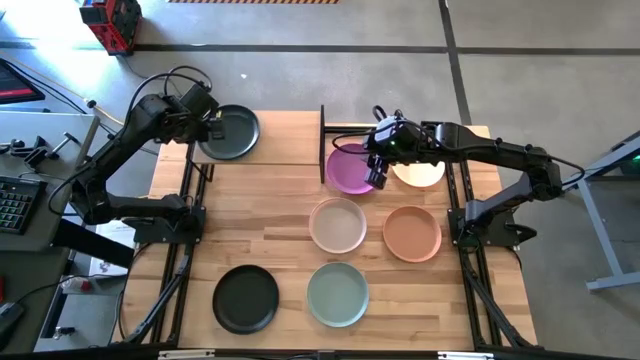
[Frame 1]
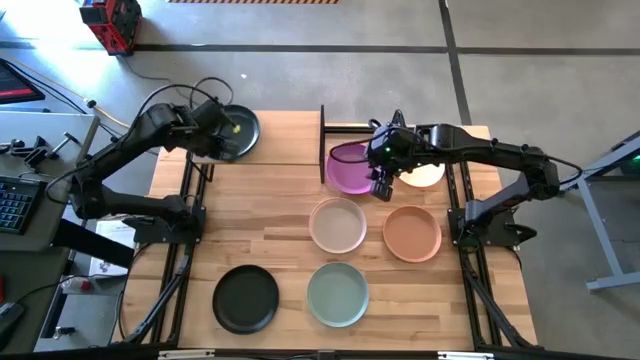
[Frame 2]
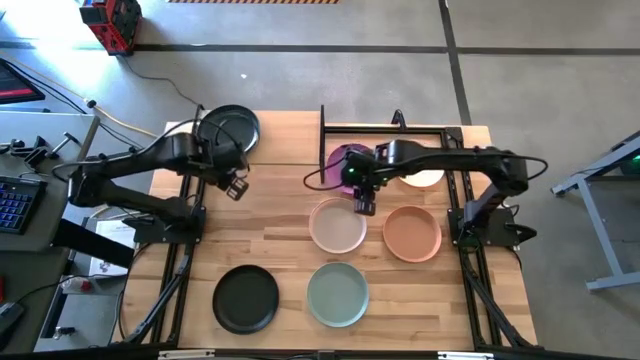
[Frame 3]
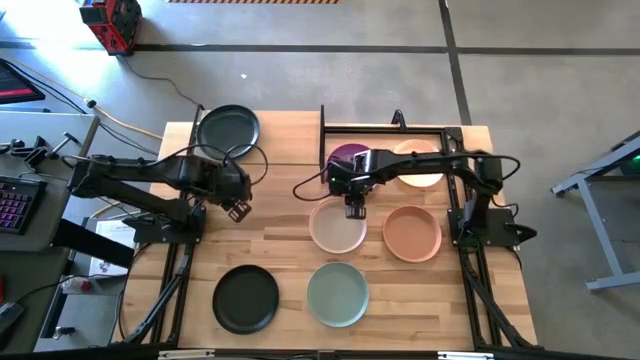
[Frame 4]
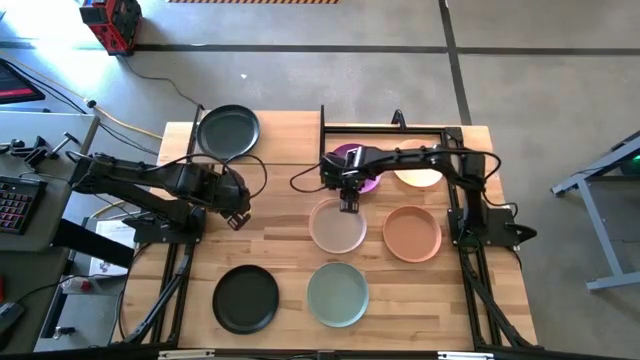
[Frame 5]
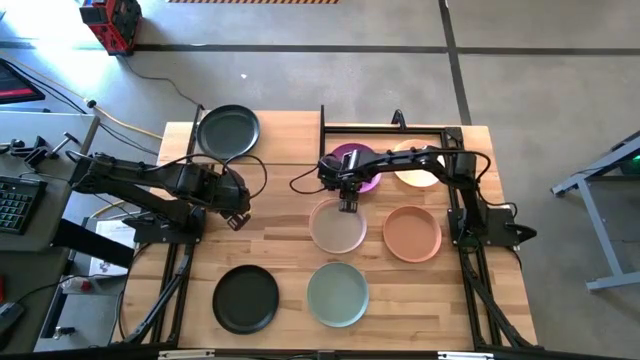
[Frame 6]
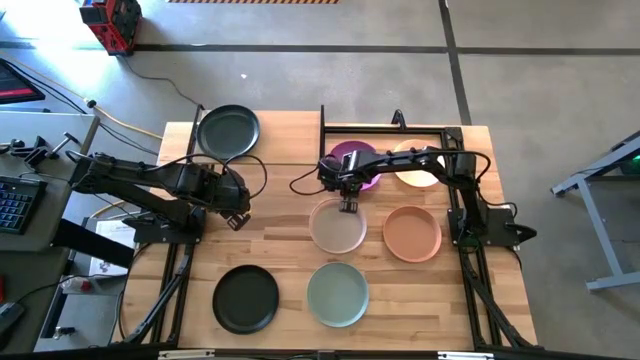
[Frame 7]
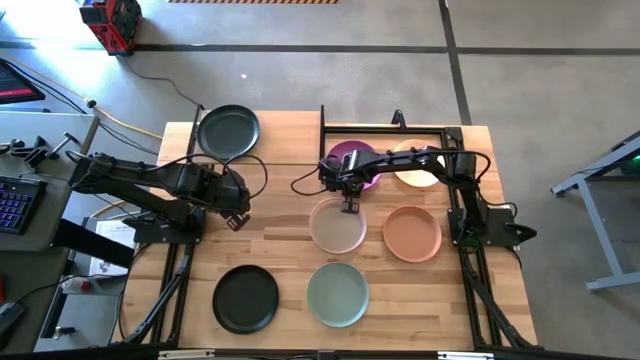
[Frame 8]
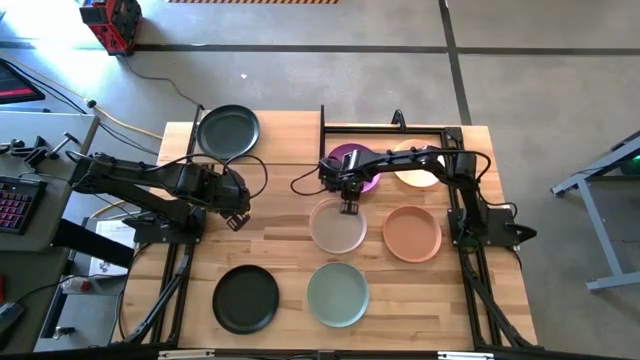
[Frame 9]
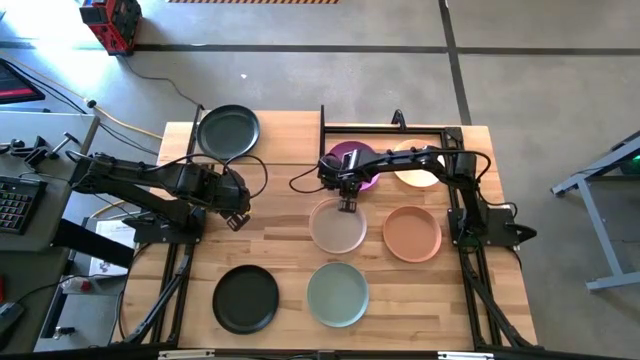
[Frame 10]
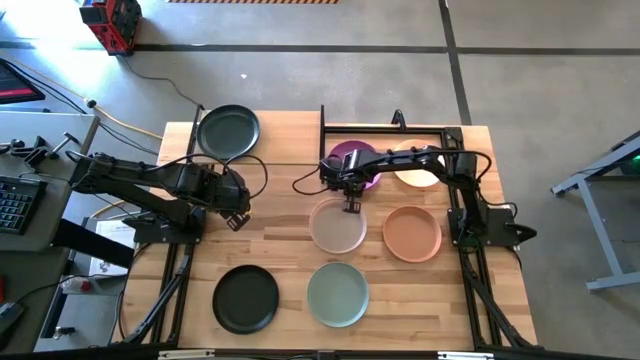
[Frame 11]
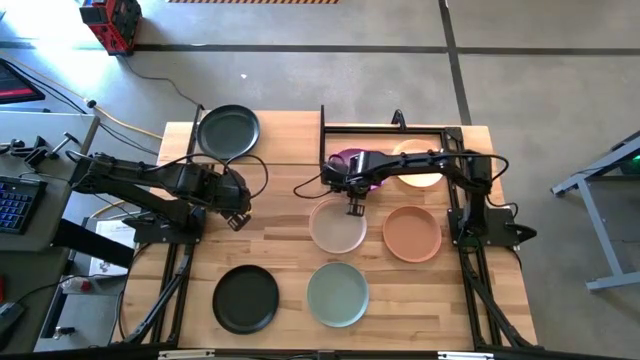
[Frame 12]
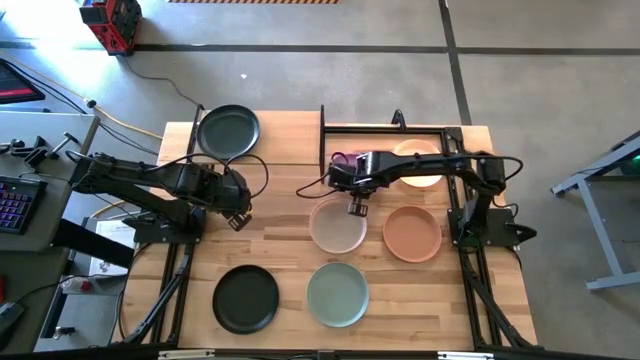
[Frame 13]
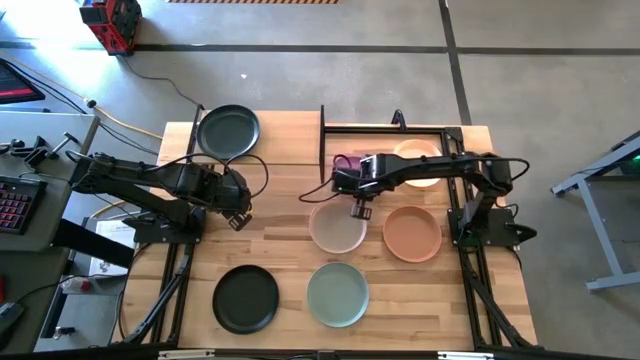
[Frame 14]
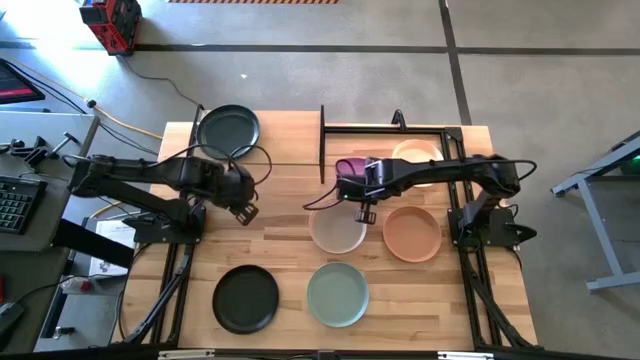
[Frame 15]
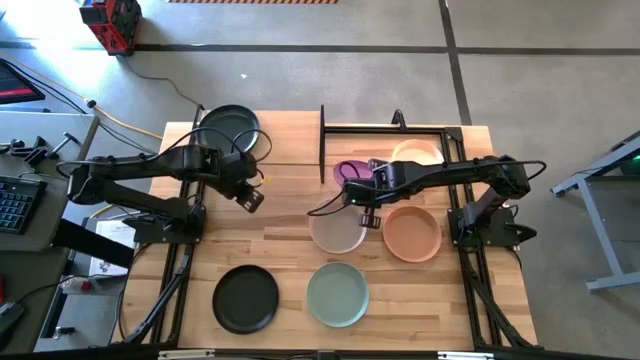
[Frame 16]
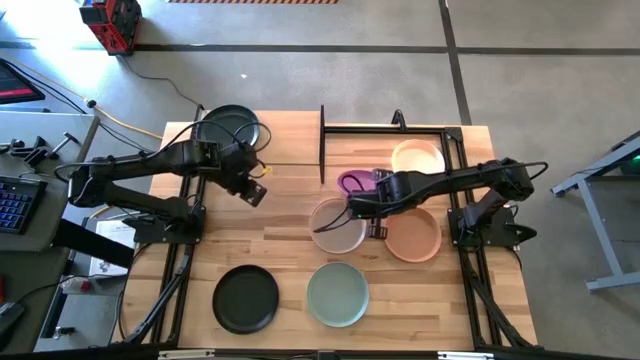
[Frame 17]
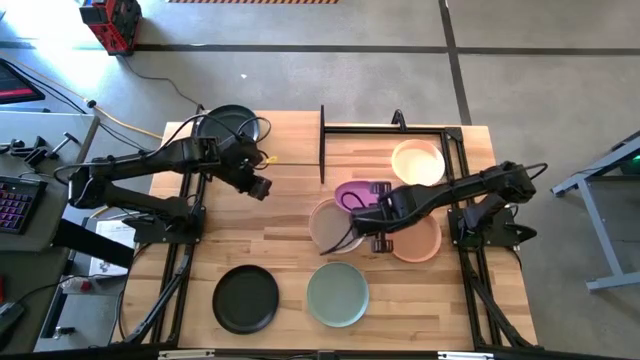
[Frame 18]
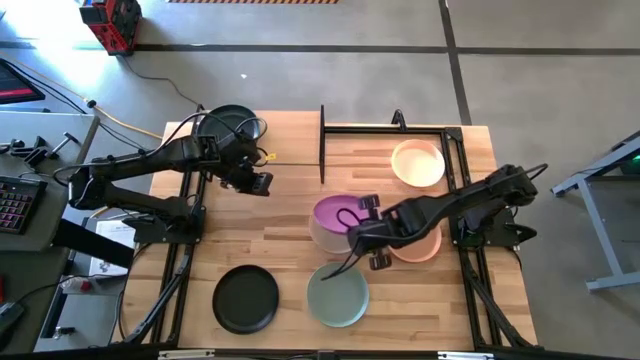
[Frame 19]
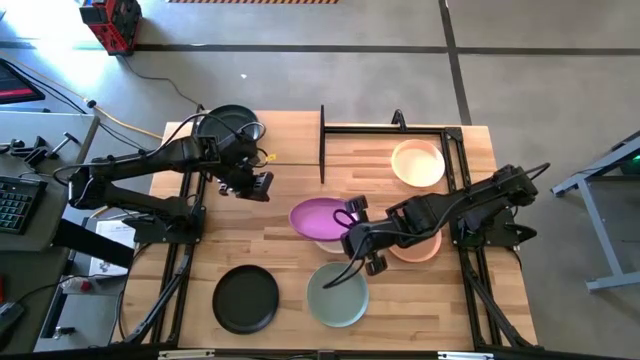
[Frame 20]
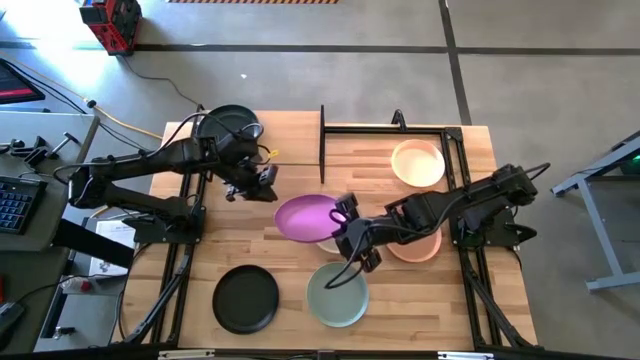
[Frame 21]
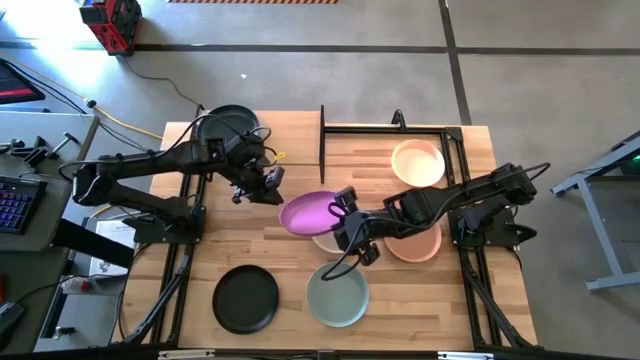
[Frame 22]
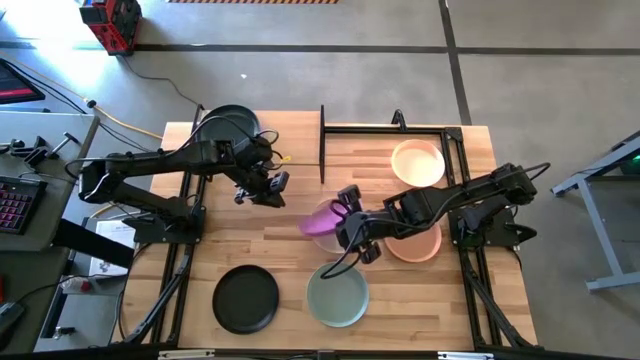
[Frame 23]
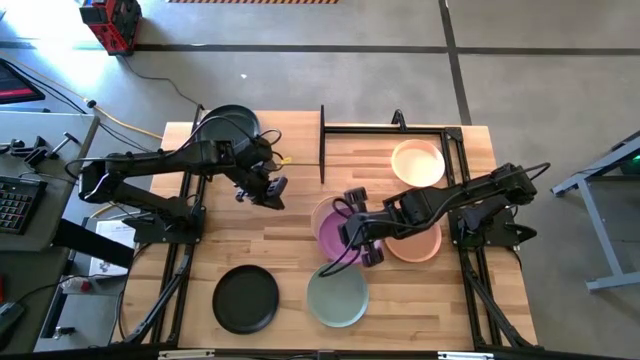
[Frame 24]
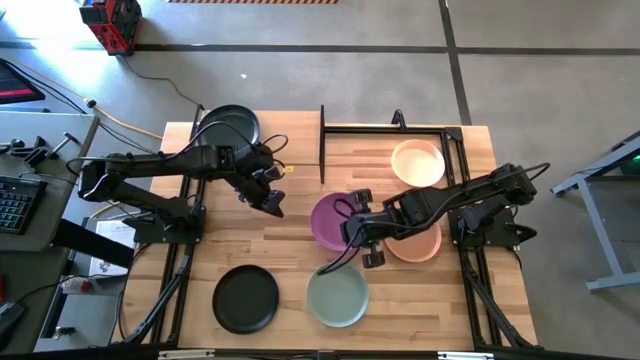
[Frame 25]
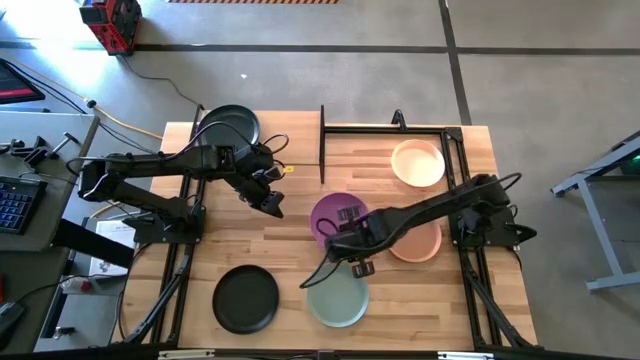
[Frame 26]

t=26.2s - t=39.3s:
Task: Place and stack plates onto a shelf
Stack the violet plate on top of the black plate on the shelf

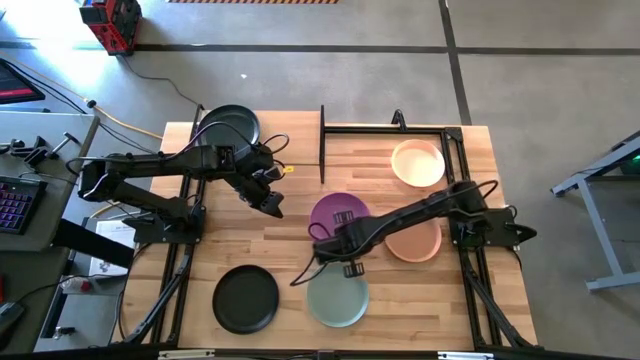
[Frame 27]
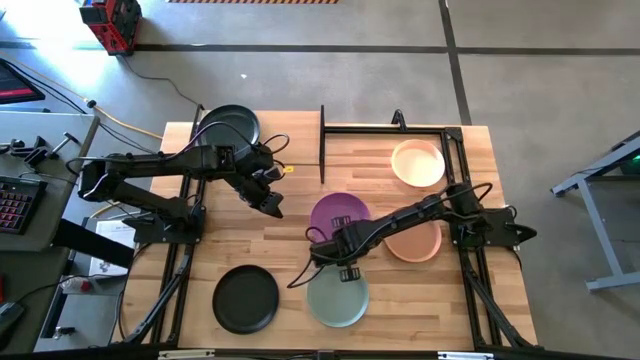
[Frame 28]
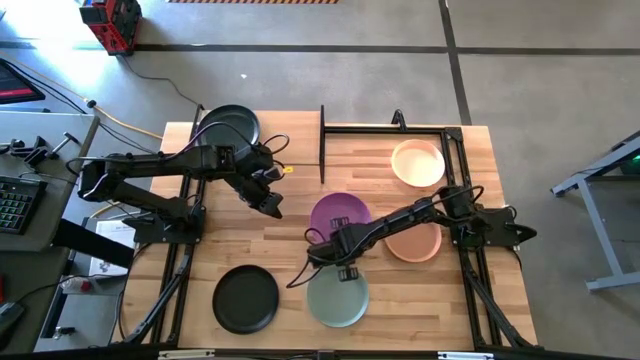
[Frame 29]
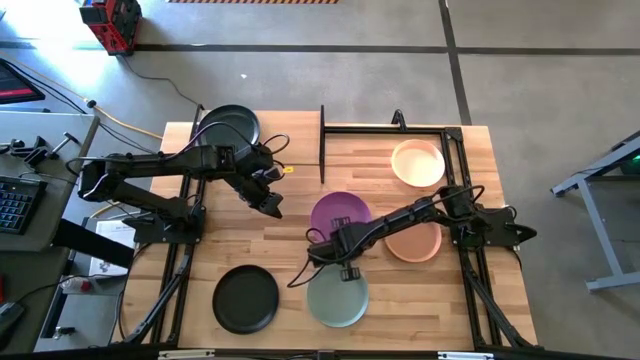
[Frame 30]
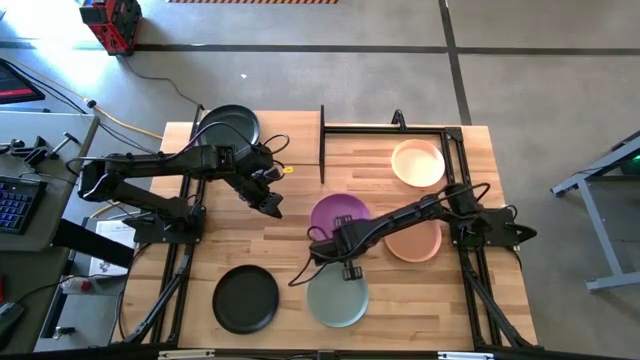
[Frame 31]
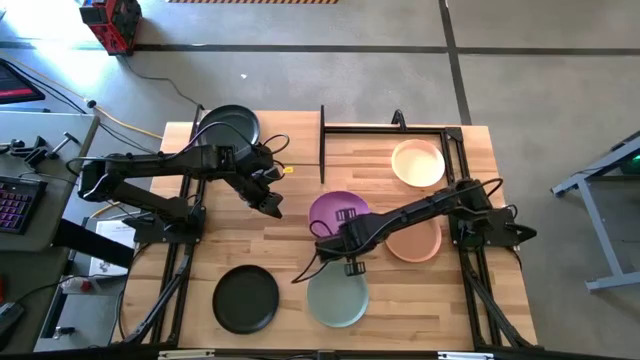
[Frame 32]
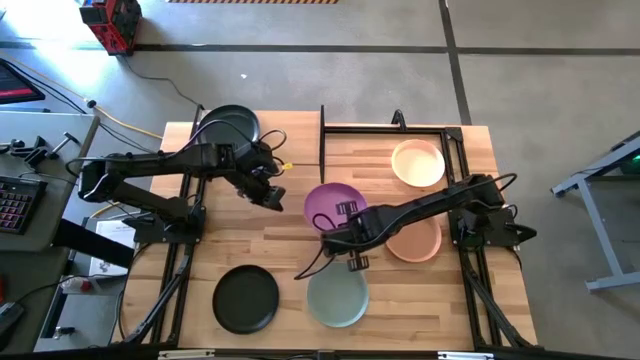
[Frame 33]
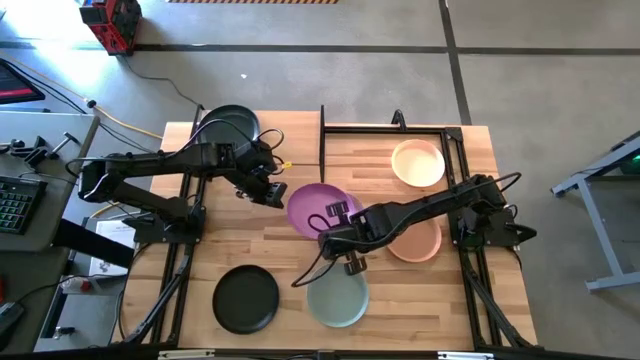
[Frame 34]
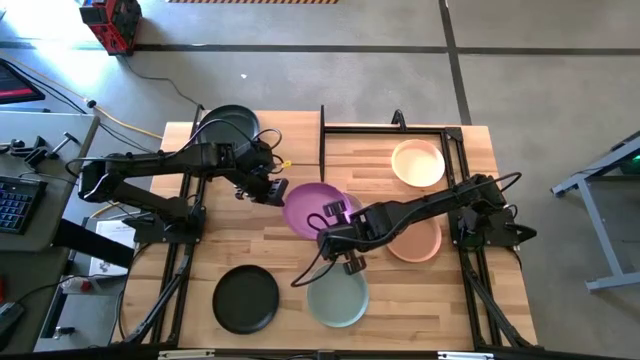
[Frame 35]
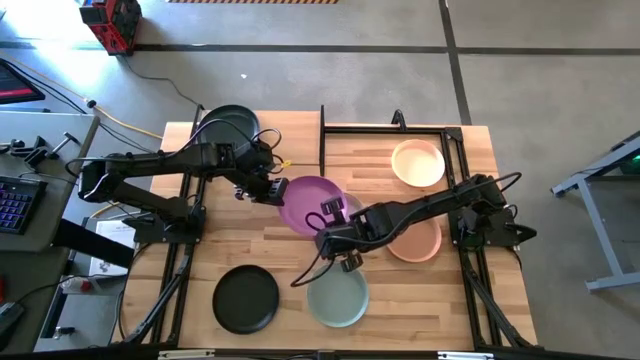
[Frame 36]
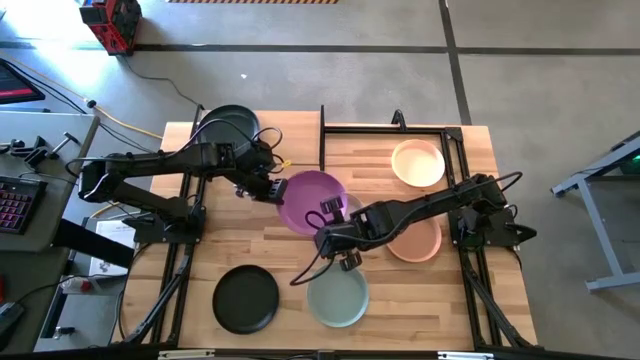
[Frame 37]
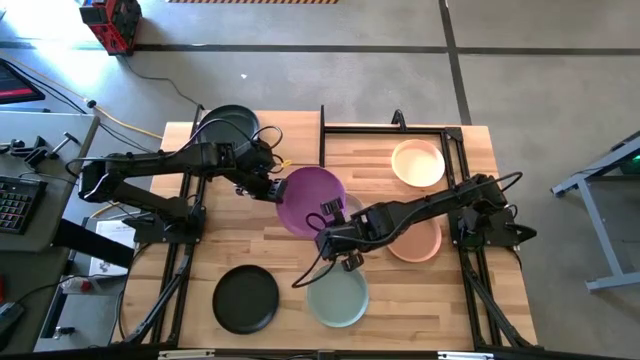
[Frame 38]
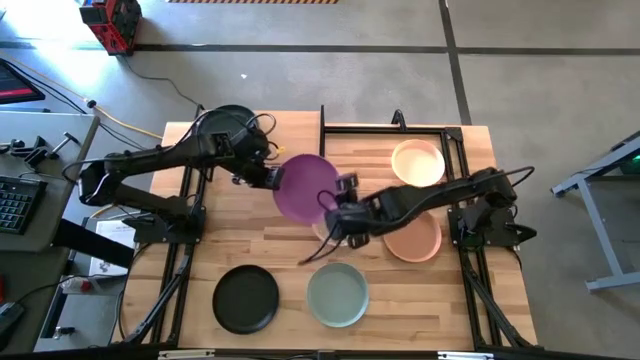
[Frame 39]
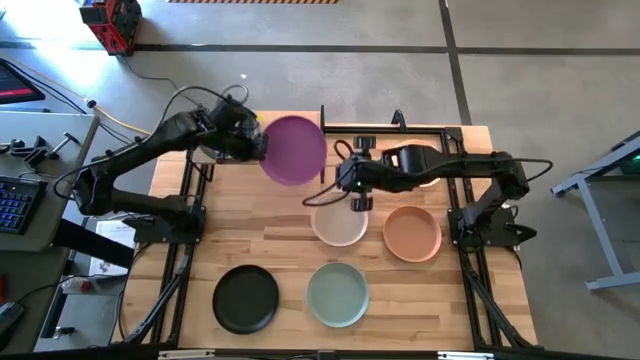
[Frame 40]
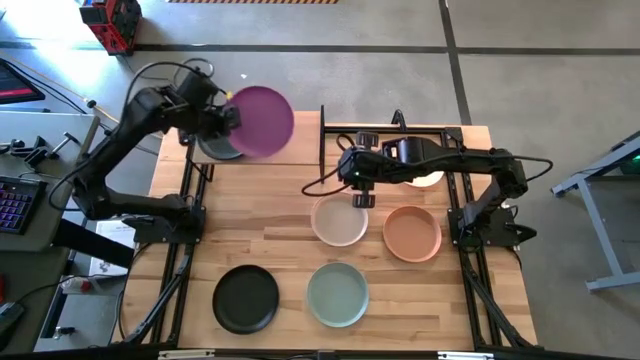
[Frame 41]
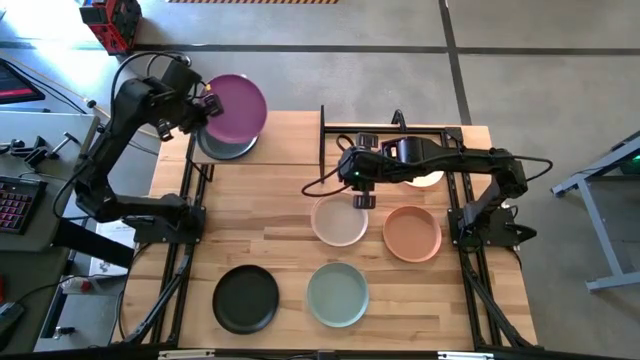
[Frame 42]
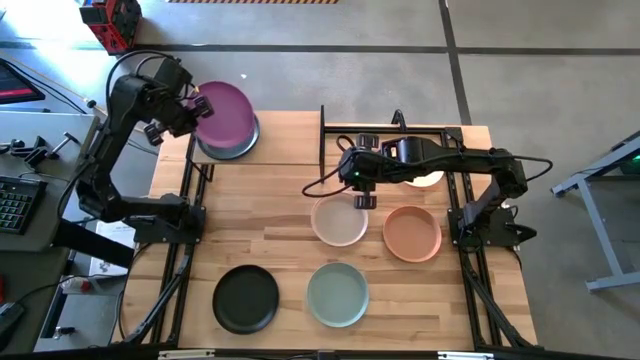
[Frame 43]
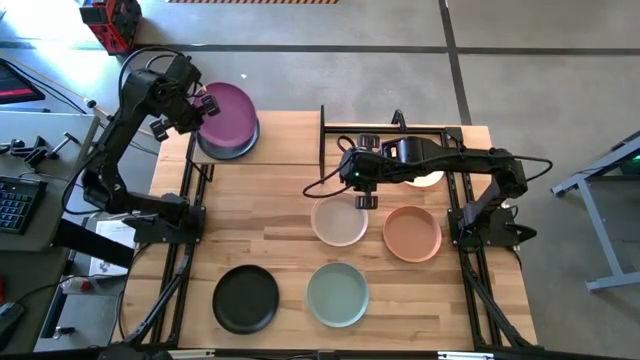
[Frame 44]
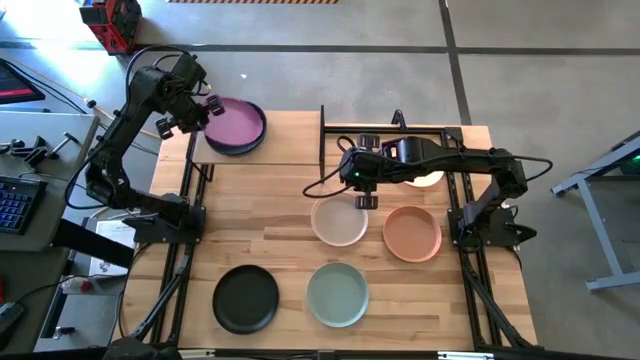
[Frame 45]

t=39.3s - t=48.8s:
Stack the violet plate on top of the black plate on the shelf
